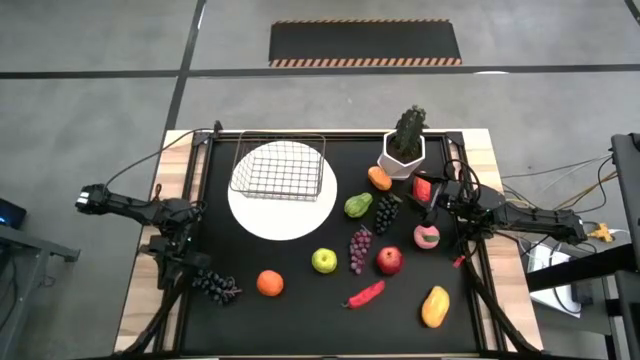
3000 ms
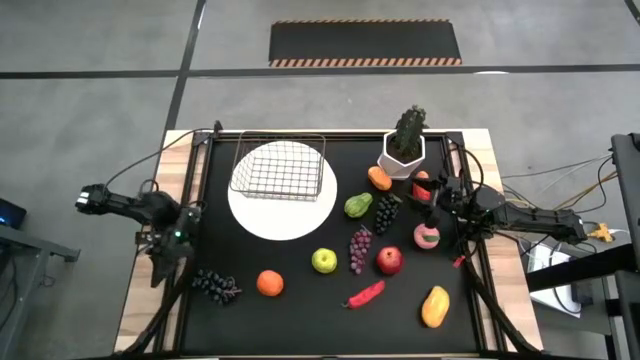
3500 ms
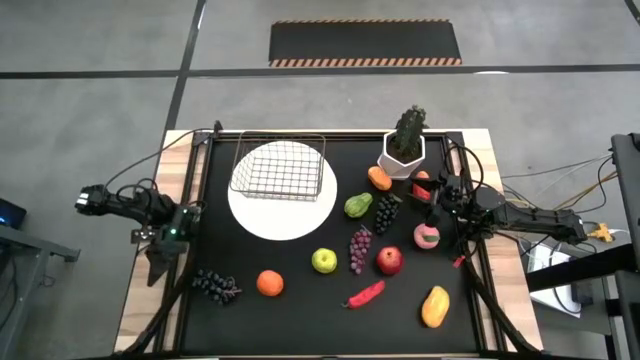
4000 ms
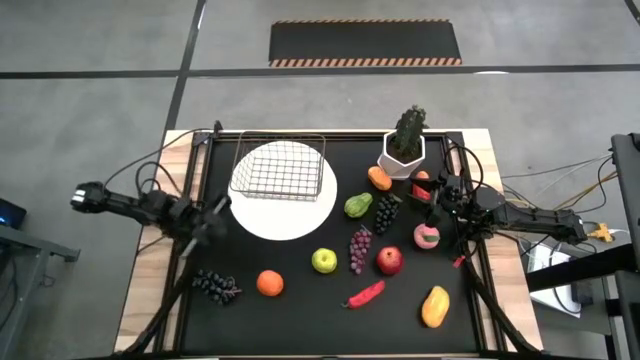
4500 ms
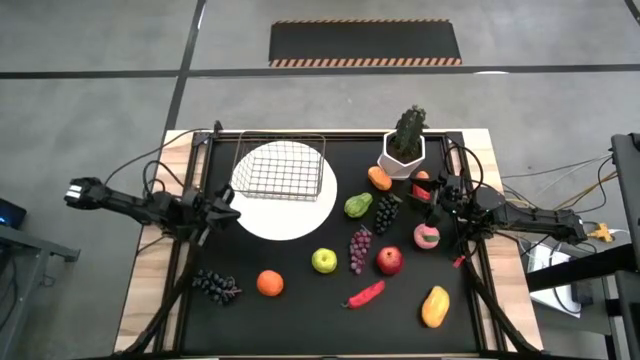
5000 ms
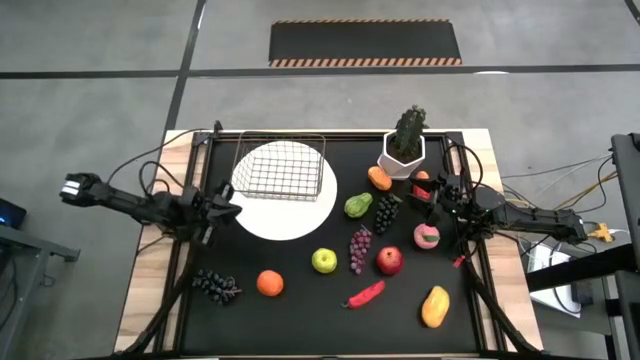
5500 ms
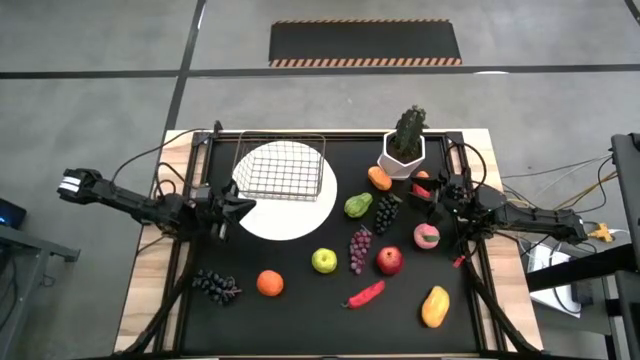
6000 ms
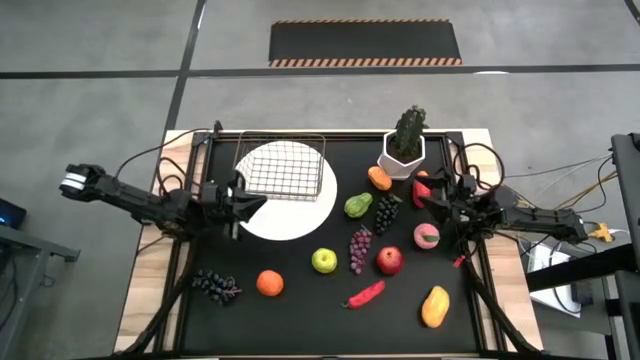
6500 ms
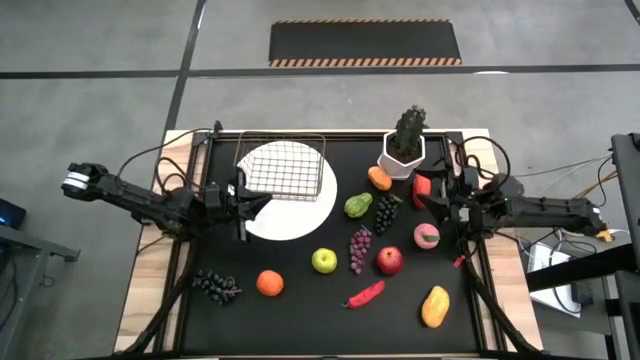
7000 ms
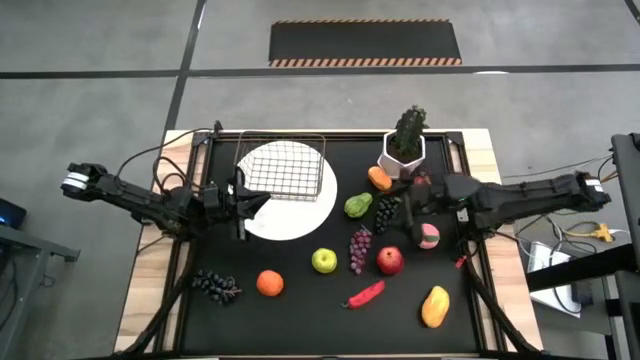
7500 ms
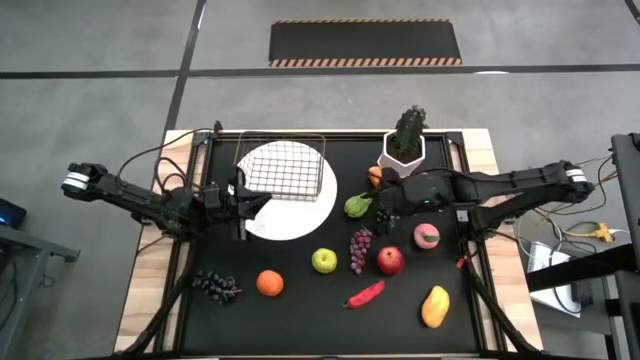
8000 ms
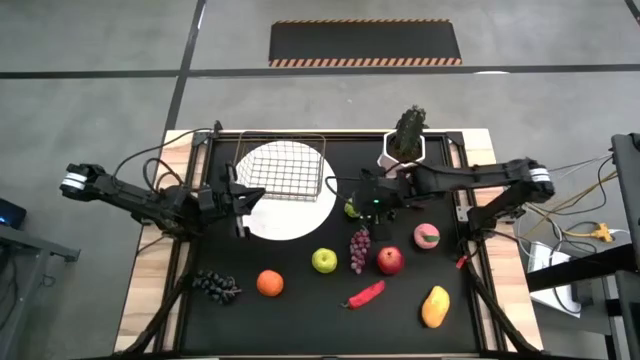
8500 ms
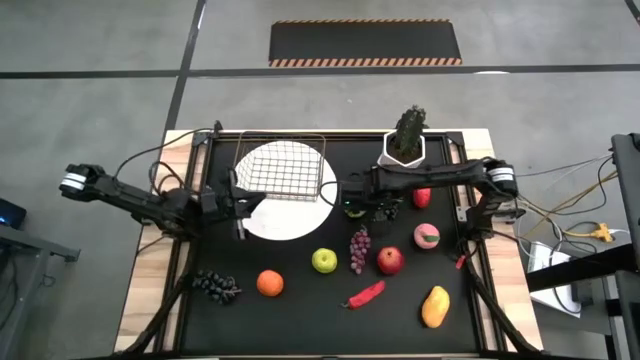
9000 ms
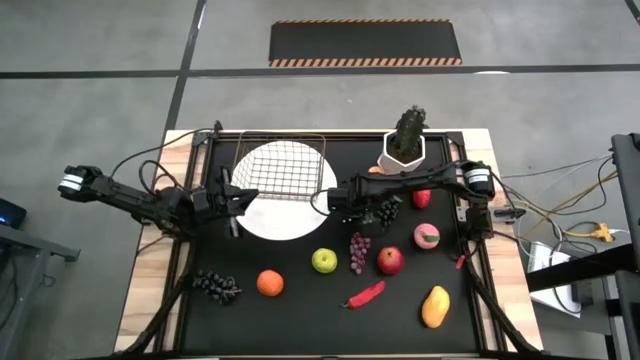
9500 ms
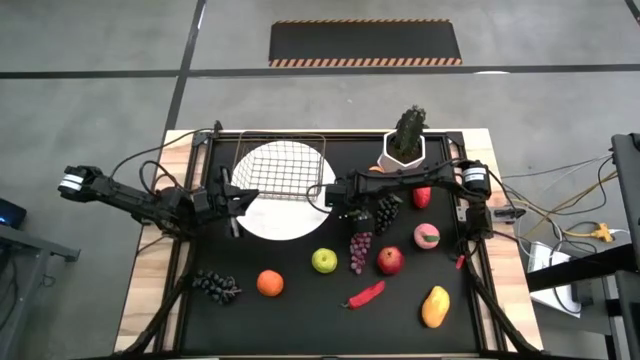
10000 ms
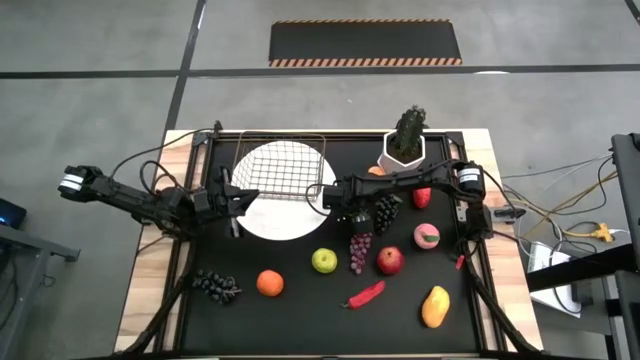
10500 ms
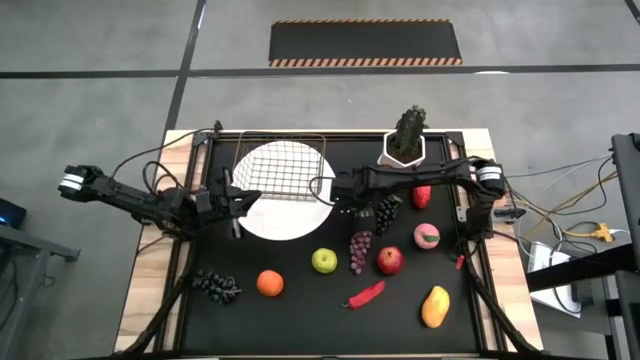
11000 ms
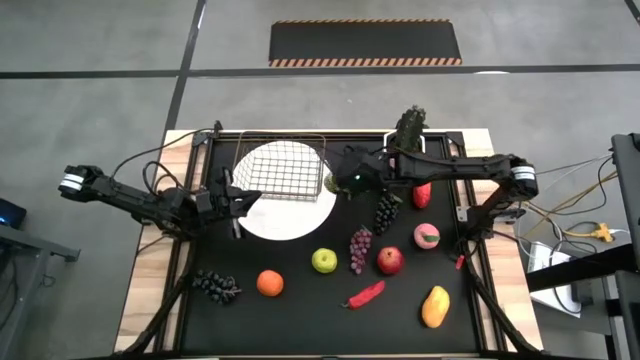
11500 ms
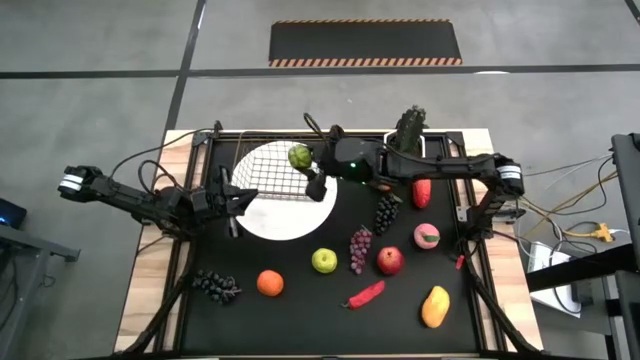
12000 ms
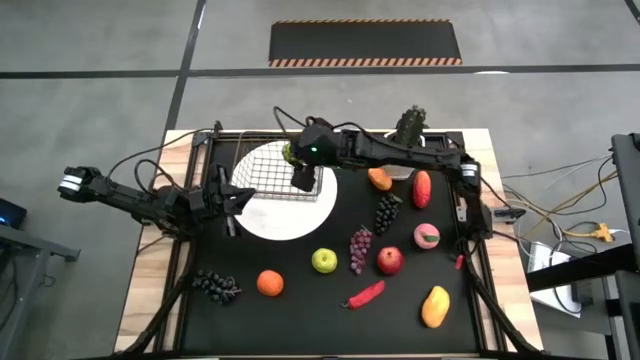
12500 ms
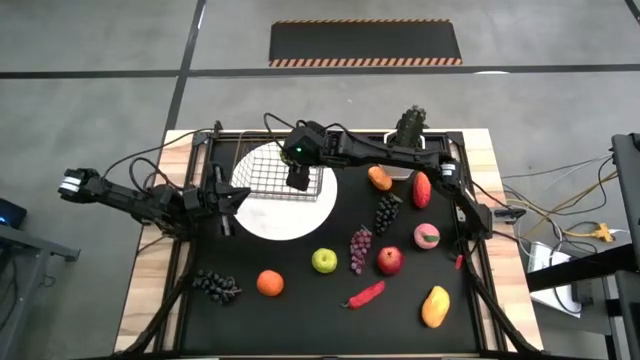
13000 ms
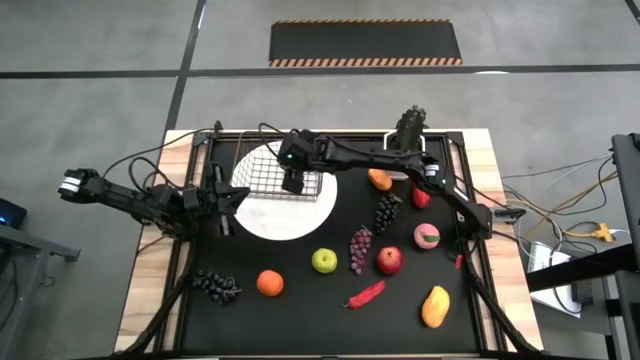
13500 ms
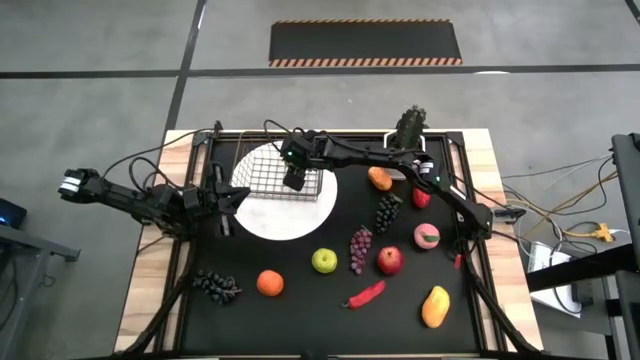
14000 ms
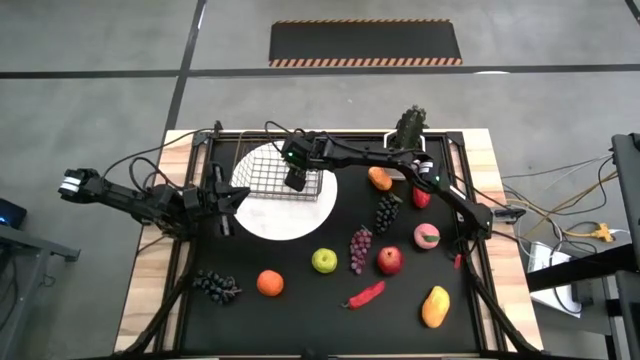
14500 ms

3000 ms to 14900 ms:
Task: Build produce basket
Put the chayote in the gold wire basket

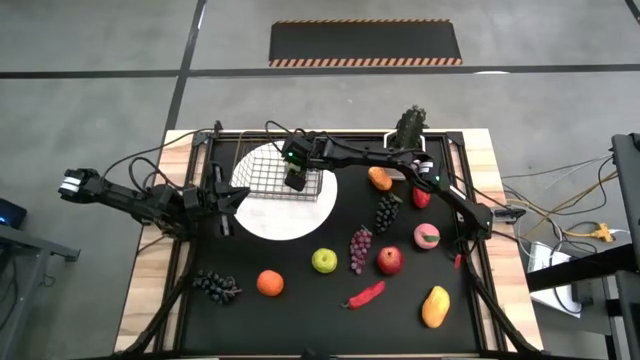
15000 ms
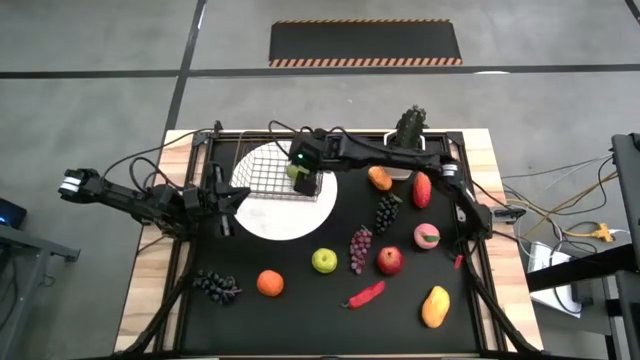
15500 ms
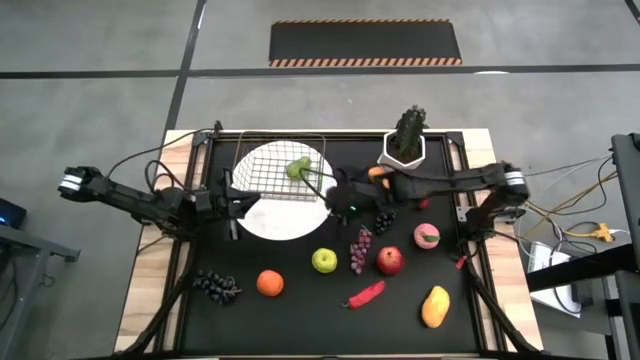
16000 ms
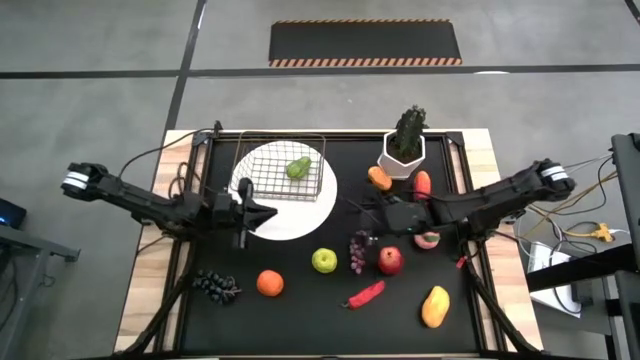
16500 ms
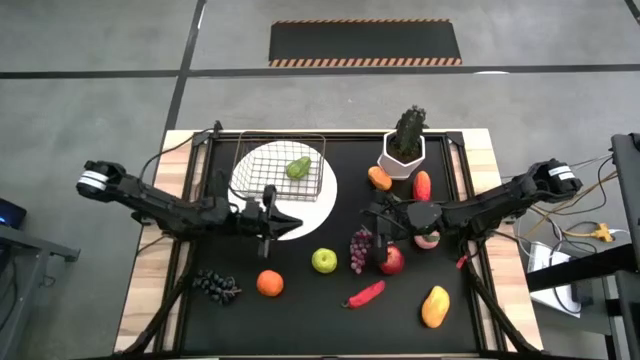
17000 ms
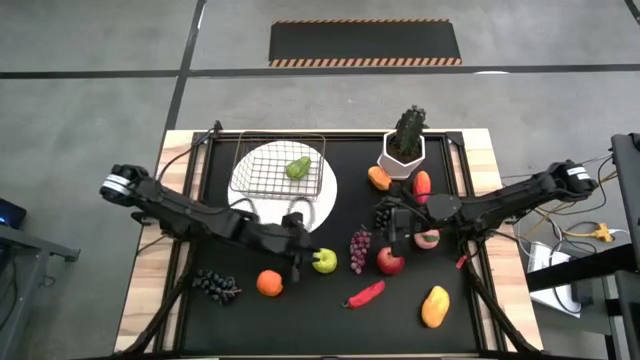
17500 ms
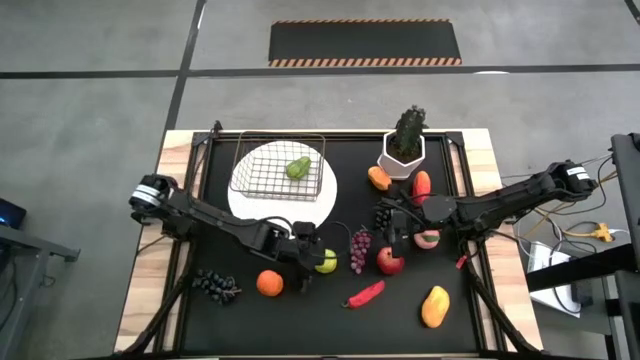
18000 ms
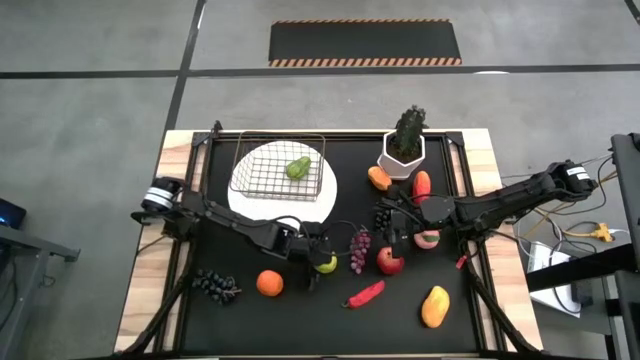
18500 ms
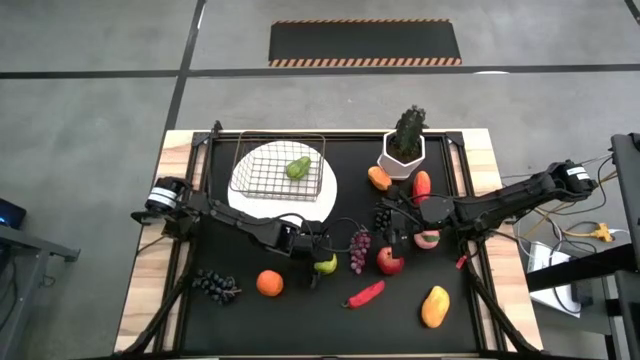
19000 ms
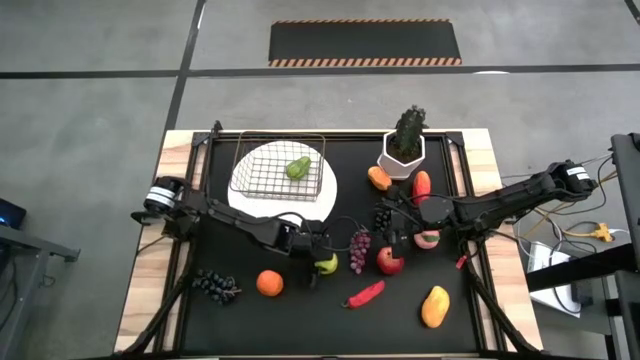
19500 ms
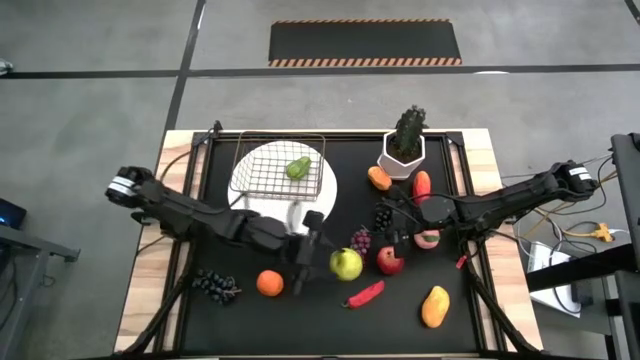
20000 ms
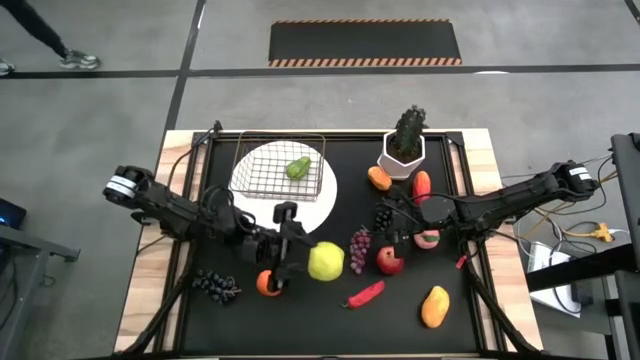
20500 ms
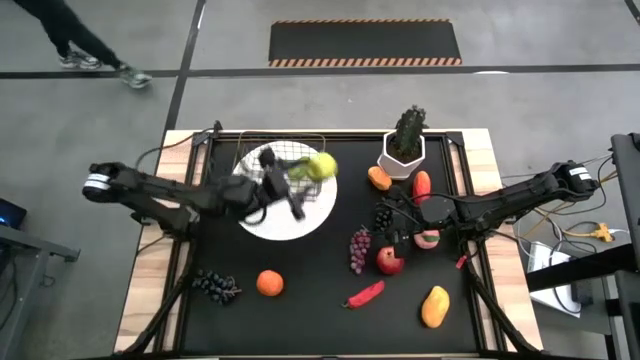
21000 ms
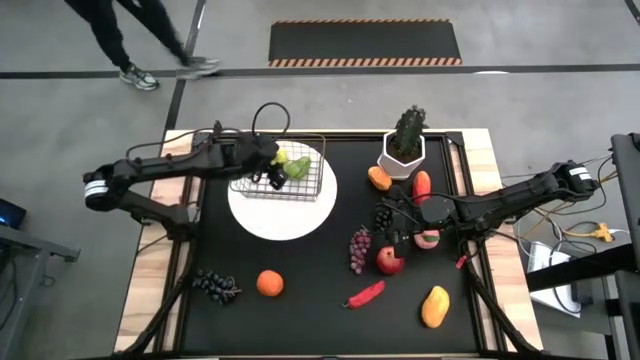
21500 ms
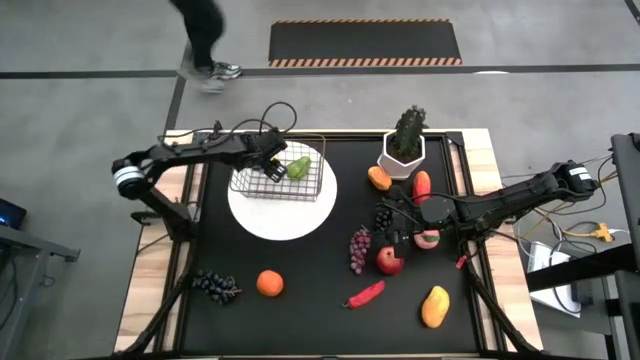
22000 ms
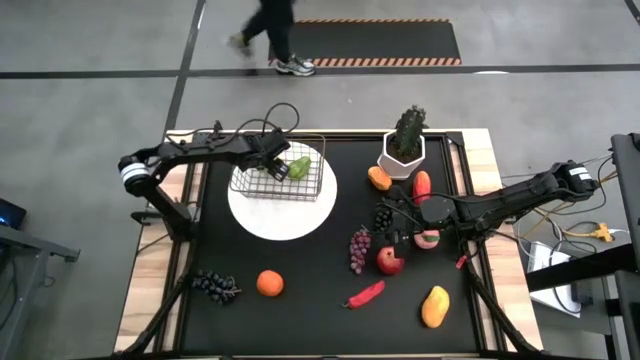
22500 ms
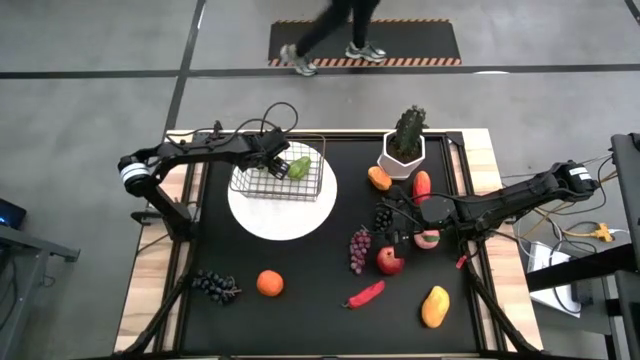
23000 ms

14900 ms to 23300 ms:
Put the green apple in the gold wire basket
